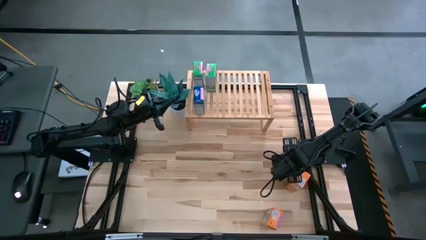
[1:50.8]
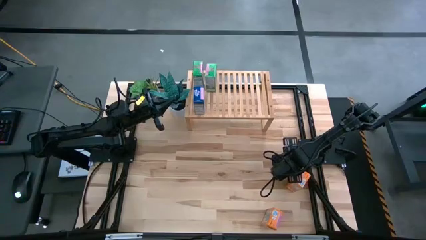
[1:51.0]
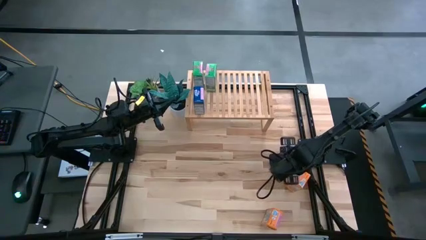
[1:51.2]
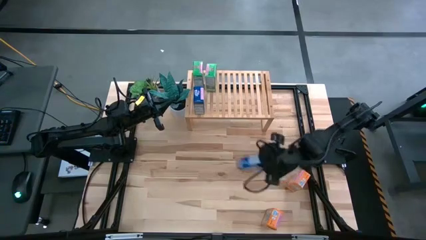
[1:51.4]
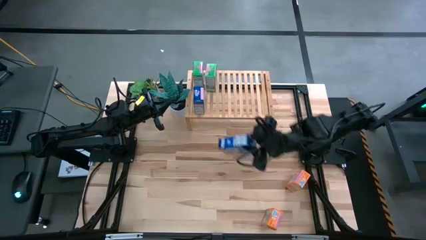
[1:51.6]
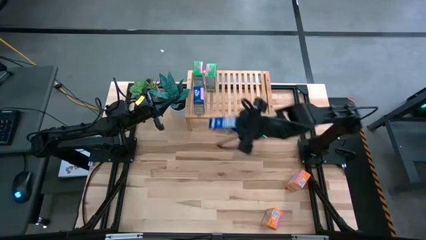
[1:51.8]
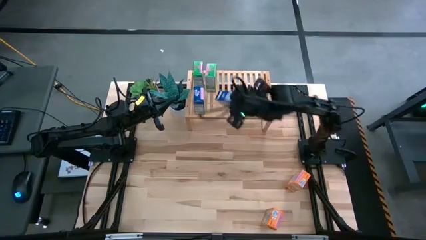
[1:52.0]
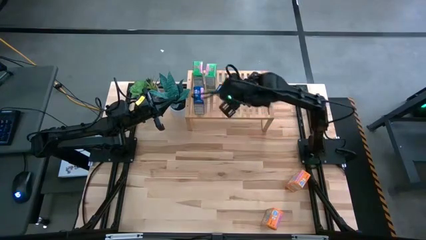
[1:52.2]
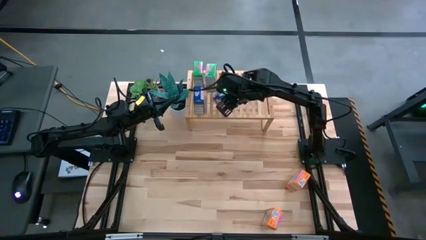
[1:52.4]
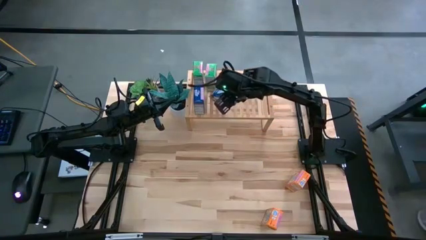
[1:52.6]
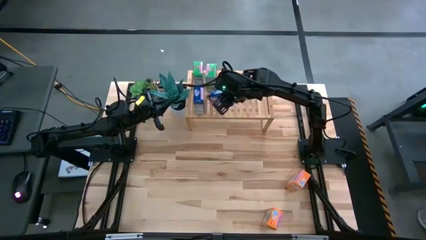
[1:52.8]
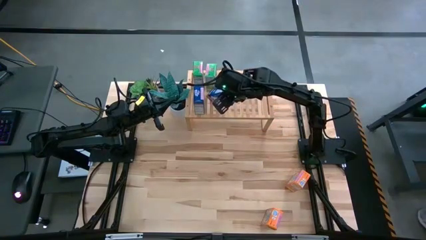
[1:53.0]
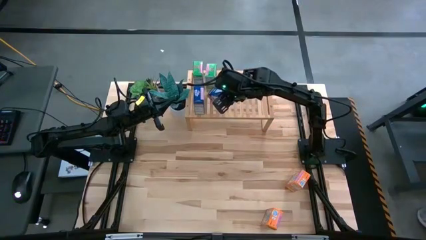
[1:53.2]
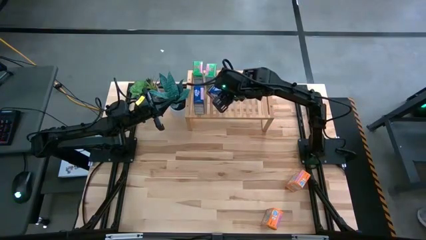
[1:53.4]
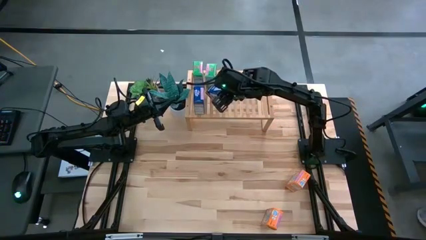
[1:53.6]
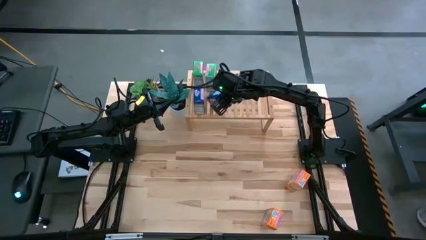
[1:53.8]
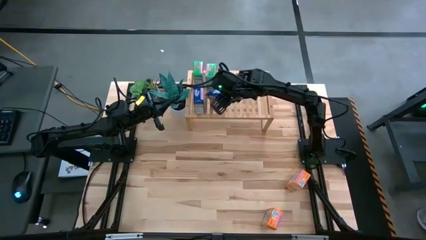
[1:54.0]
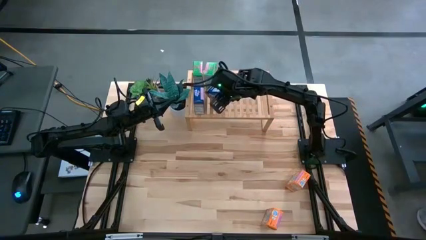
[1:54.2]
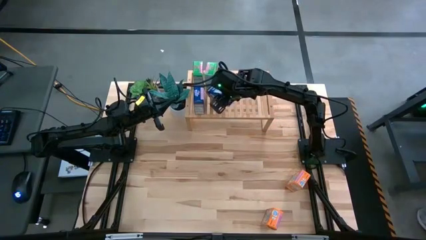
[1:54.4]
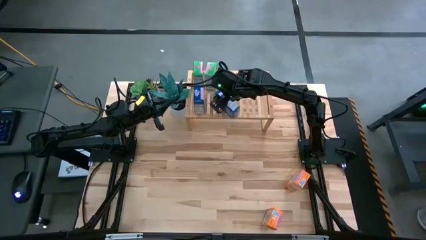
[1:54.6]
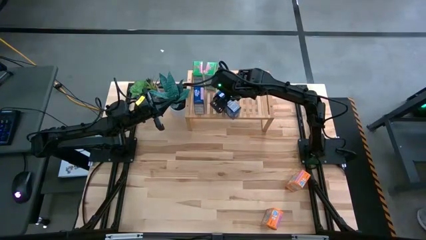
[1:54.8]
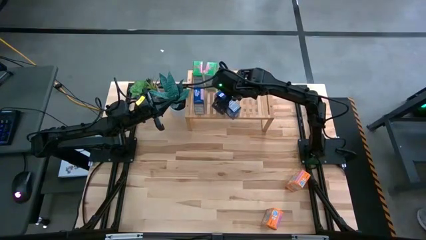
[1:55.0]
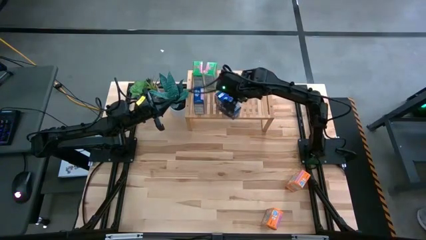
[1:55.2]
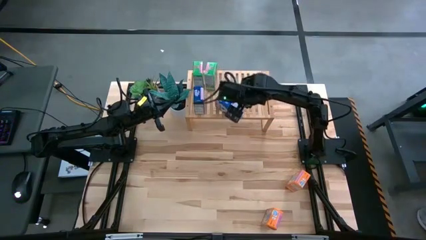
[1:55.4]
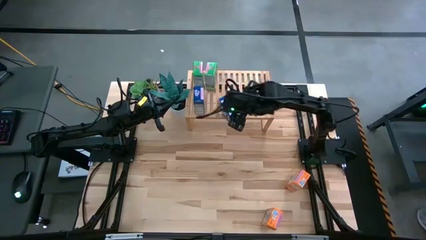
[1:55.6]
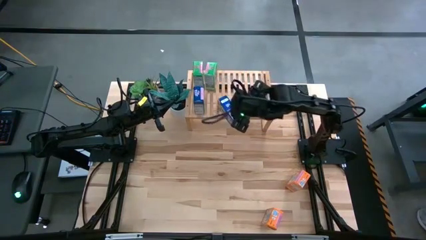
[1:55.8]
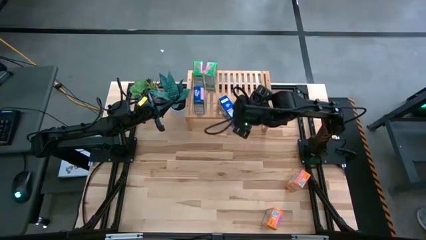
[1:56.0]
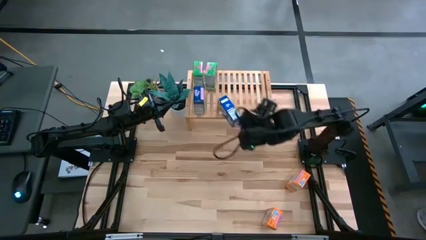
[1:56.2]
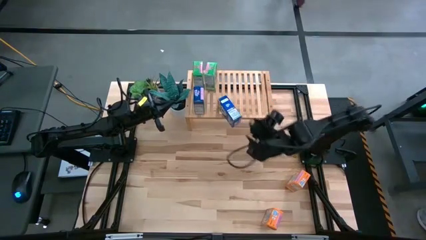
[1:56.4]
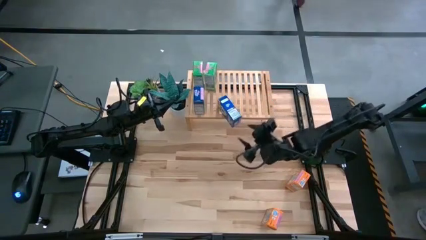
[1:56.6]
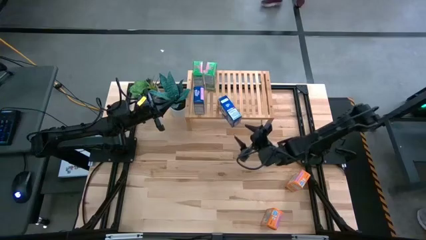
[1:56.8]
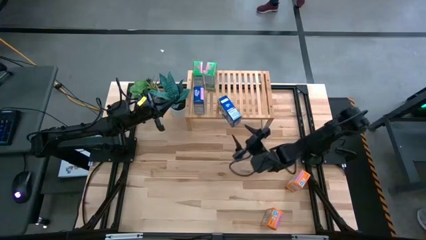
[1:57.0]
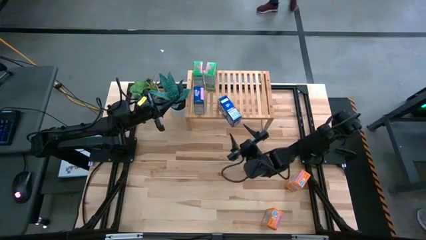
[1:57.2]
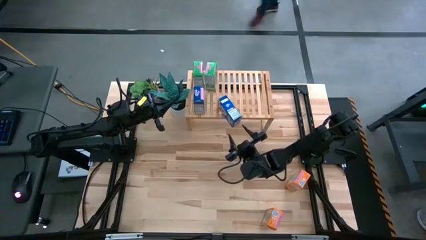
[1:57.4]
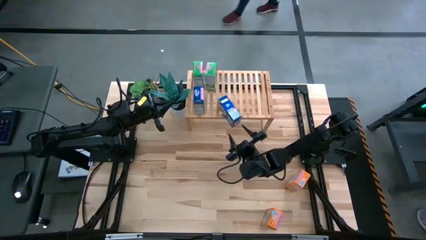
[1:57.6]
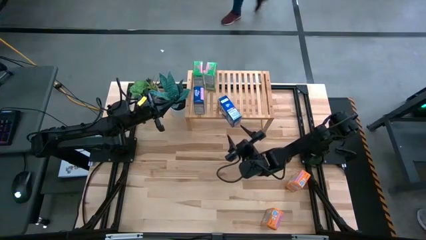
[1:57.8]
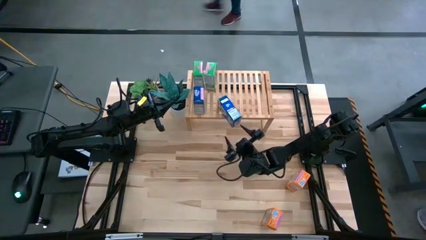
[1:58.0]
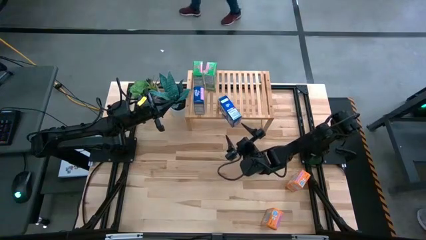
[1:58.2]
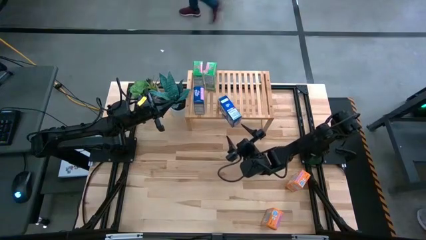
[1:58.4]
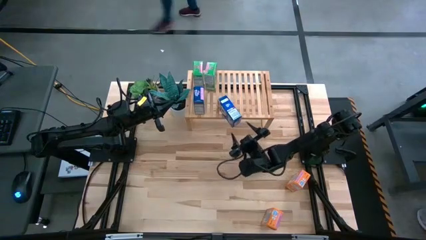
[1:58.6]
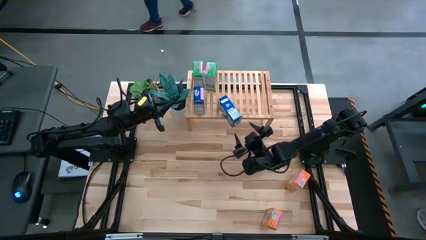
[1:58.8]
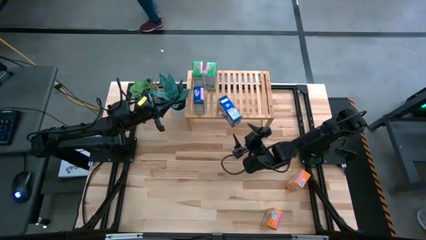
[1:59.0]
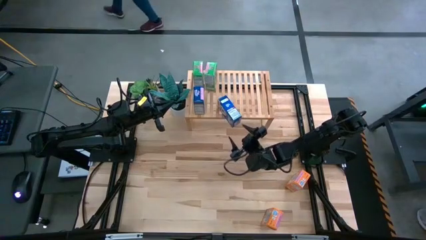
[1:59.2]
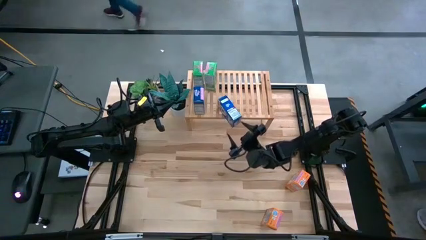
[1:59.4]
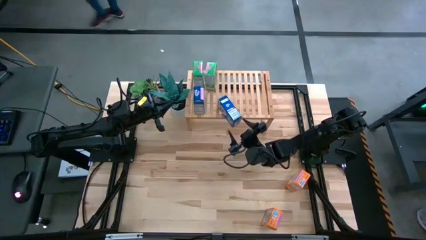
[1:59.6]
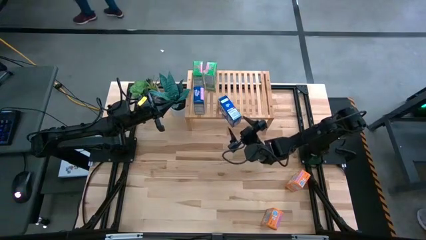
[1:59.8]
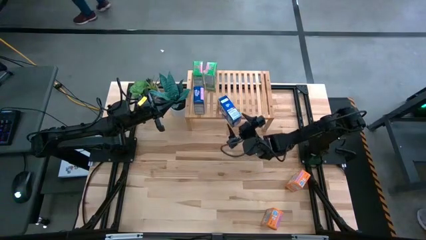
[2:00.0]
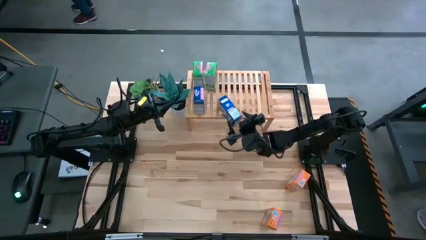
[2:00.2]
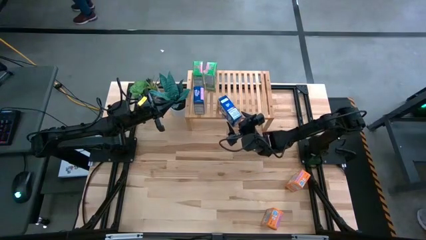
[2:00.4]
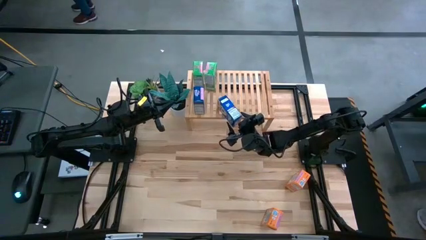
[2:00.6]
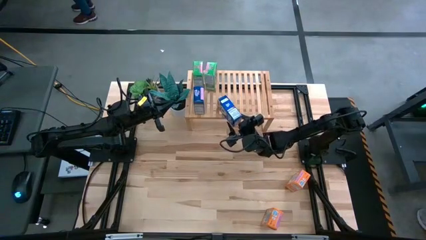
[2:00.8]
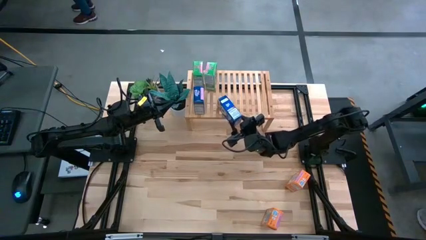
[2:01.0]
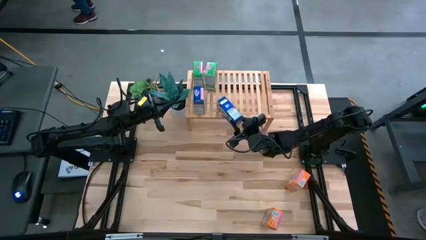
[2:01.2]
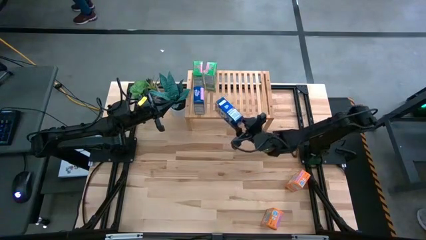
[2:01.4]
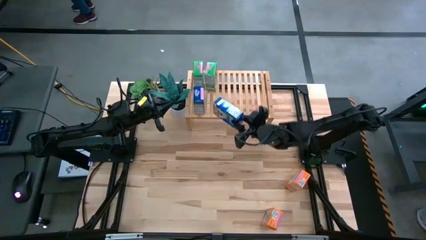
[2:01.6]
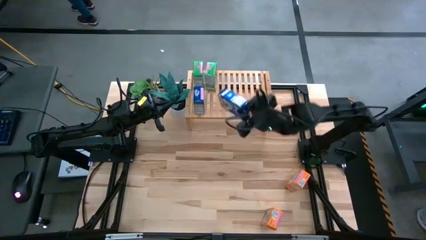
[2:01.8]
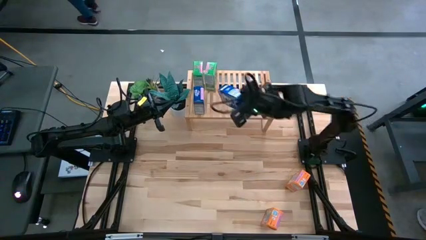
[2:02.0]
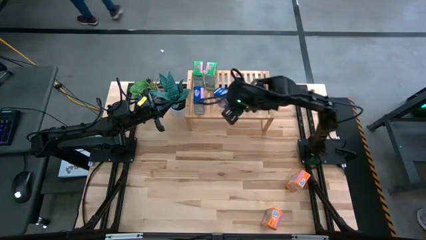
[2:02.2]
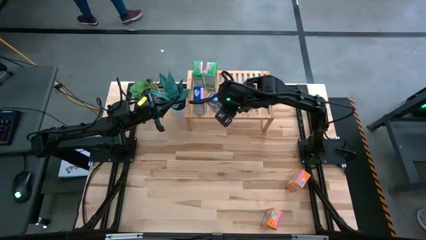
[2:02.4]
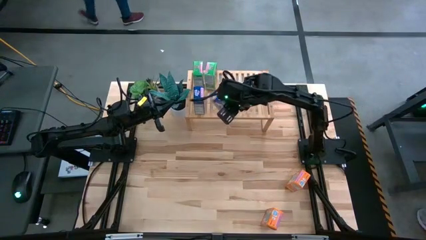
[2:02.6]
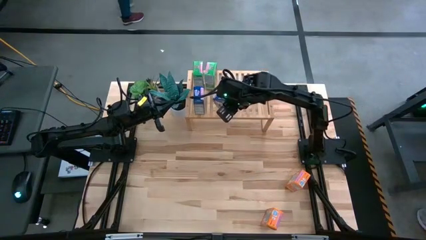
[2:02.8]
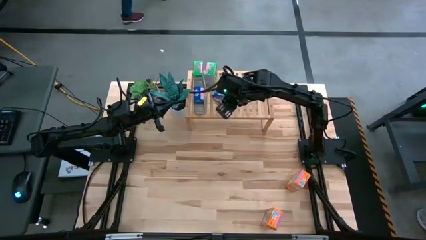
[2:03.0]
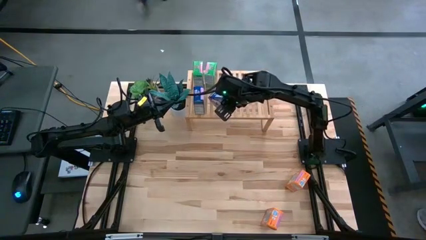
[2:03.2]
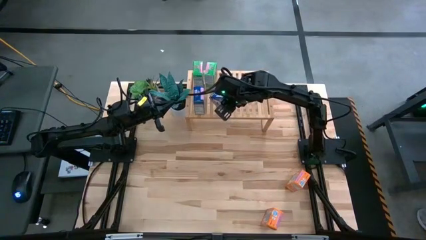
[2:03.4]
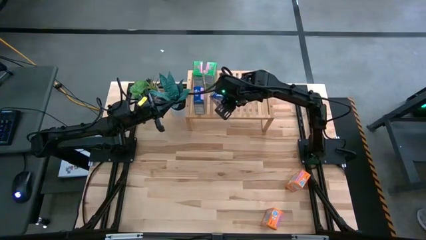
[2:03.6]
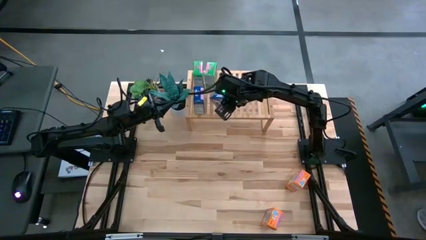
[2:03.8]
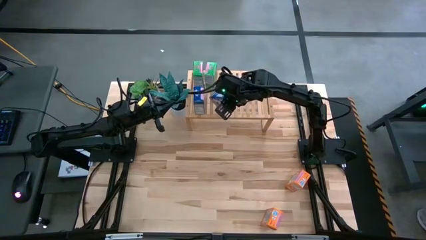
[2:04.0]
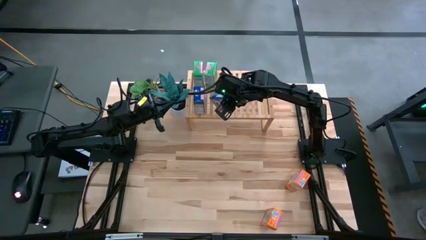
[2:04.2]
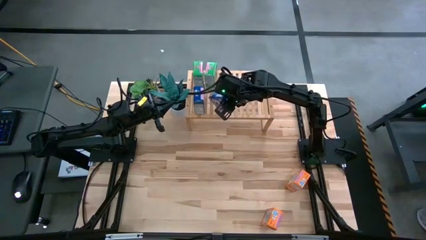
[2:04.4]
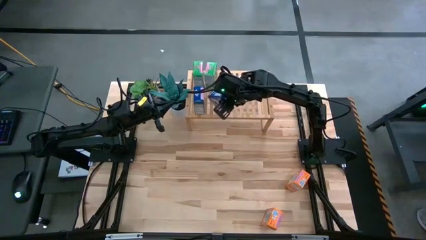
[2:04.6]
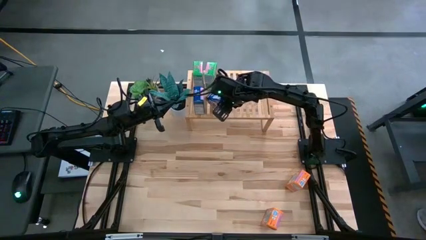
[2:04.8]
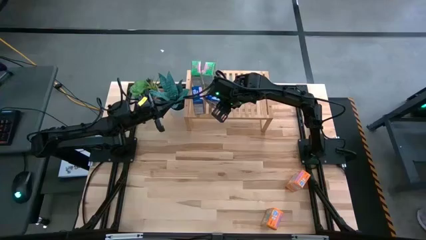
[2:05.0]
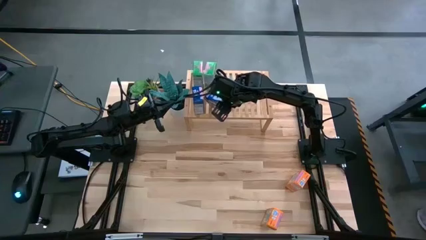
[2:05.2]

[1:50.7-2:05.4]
Task: Stack cereal on shelf
Put the blue cereal box on the shelf aligned with the other blue cereal box

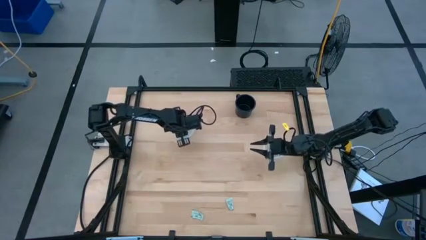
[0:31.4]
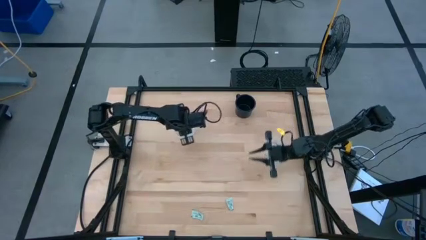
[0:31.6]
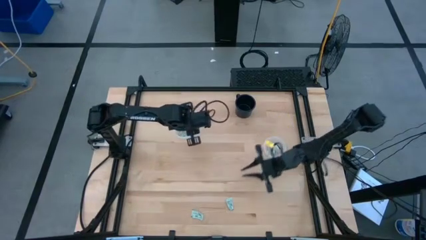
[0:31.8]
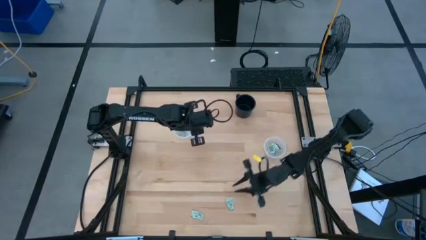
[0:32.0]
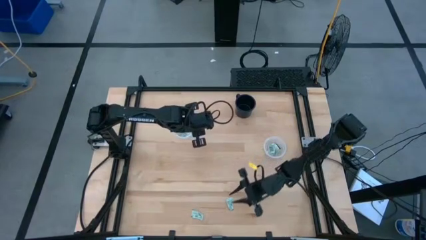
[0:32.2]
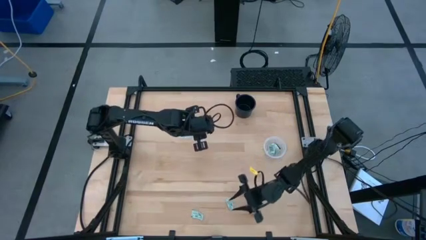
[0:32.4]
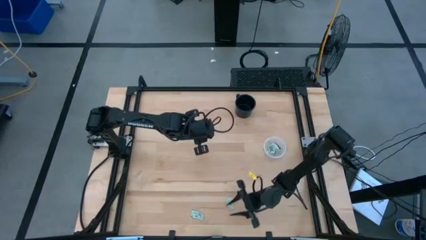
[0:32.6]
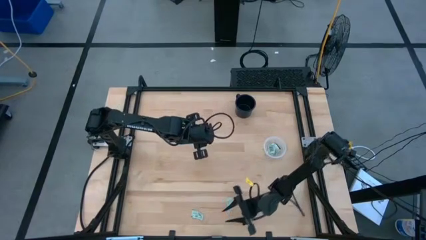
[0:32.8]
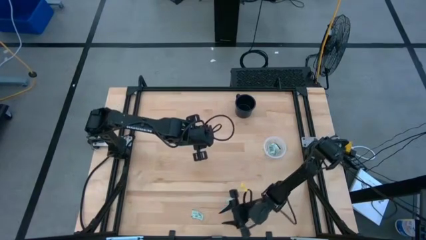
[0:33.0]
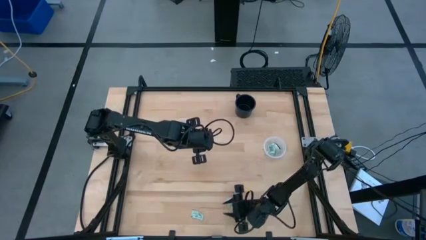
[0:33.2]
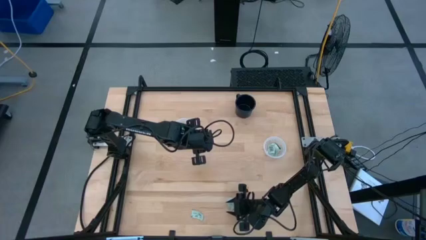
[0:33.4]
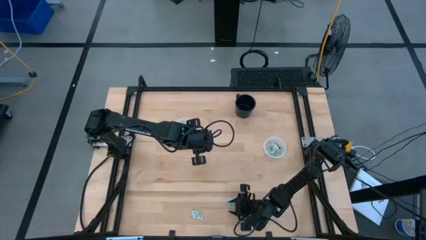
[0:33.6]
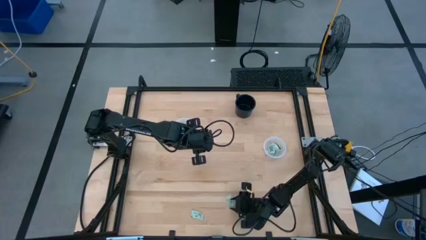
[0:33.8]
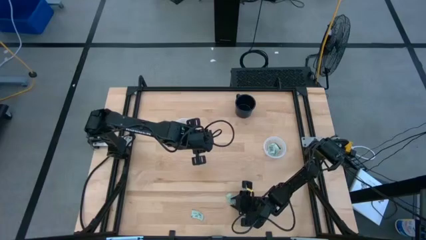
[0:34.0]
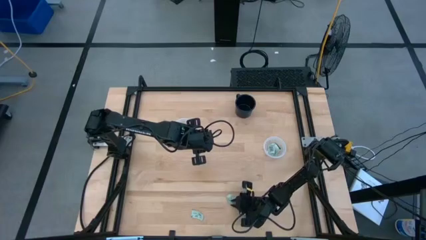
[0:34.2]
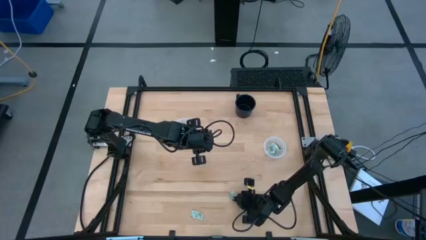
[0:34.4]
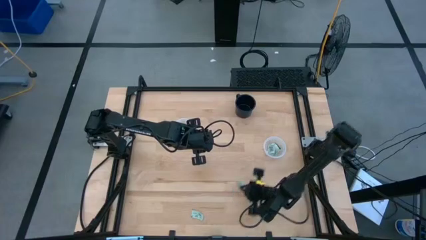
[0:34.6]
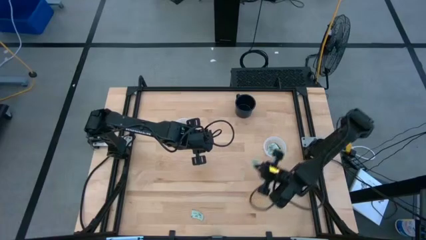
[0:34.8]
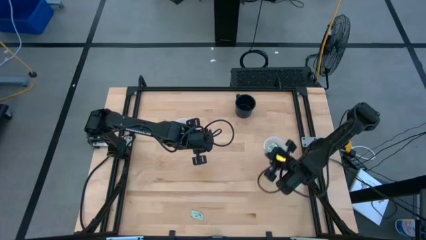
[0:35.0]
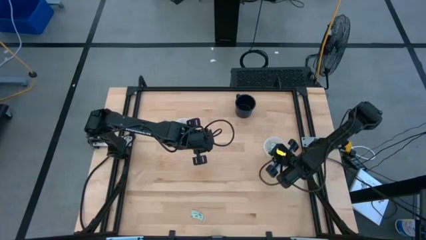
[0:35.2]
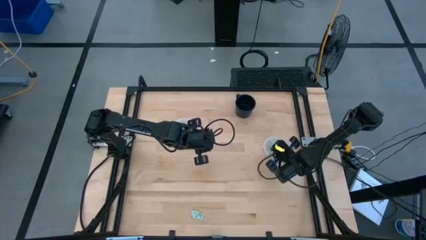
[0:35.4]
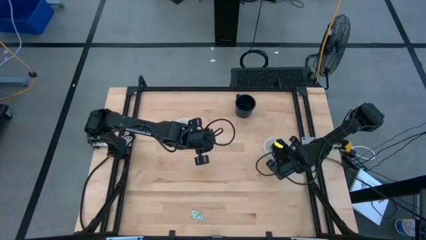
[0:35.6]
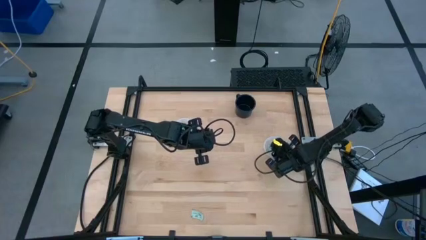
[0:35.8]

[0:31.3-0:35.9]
Task: Pick and place items into bin
Put the white stevia packet into the right transparent bin
